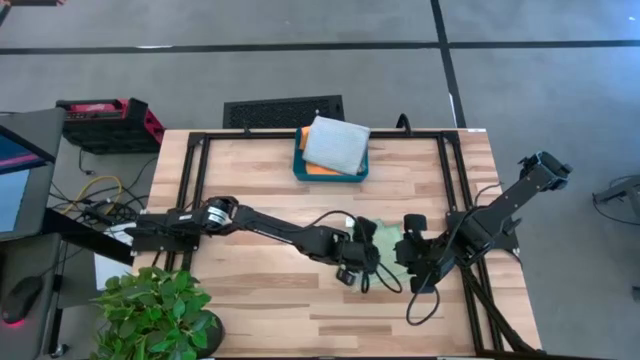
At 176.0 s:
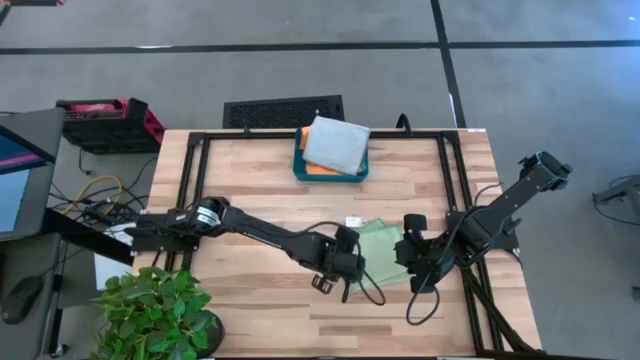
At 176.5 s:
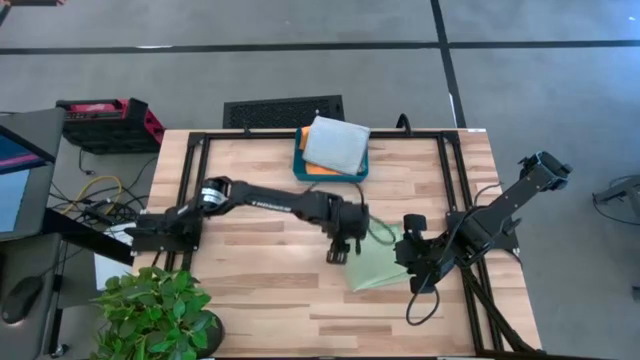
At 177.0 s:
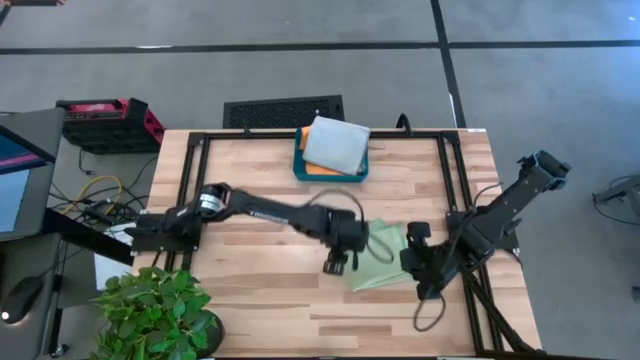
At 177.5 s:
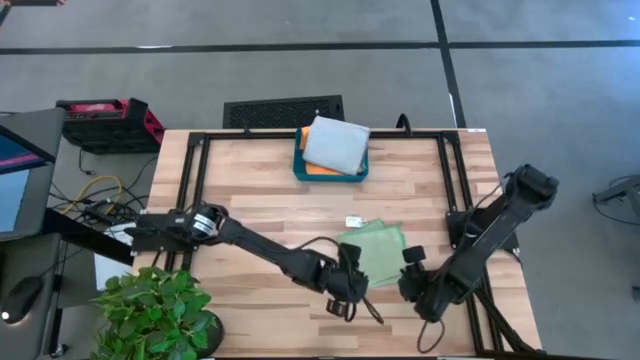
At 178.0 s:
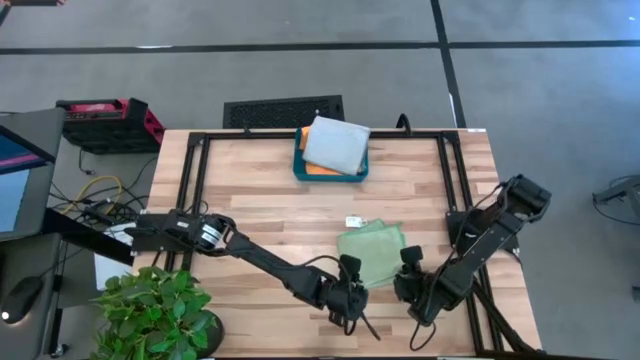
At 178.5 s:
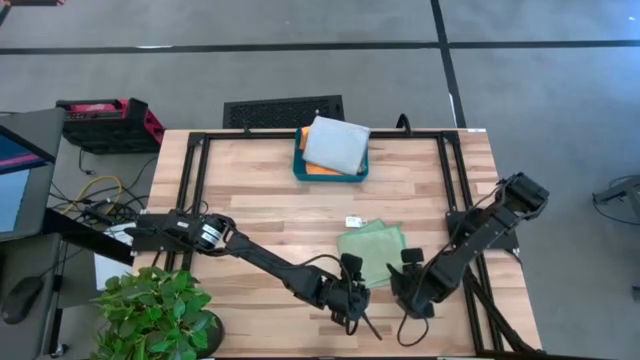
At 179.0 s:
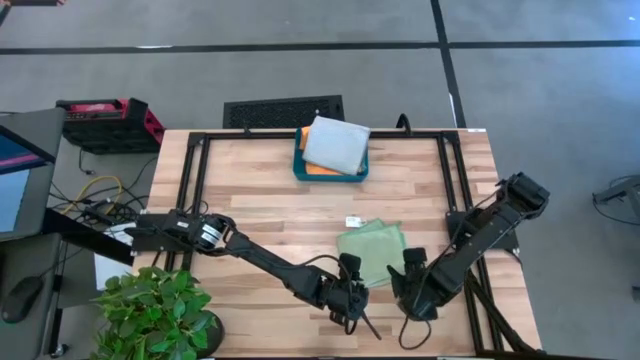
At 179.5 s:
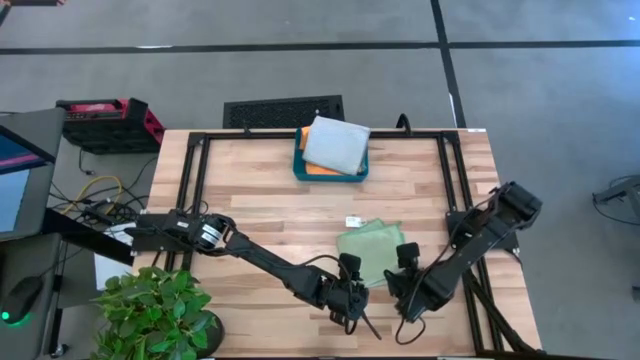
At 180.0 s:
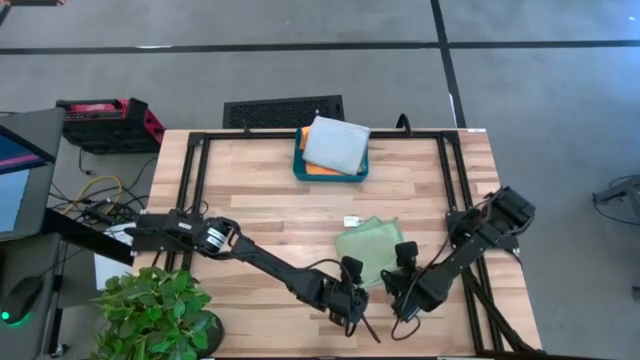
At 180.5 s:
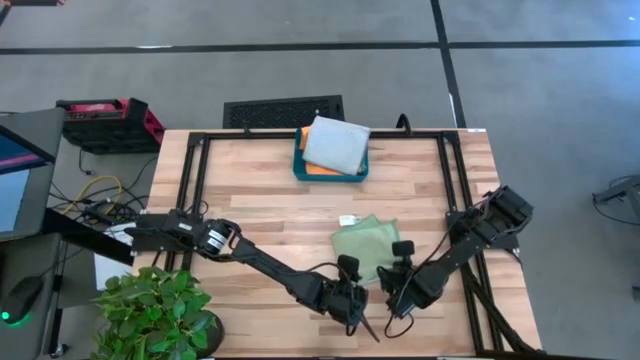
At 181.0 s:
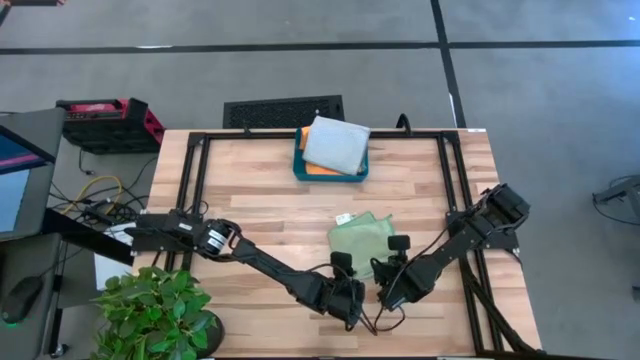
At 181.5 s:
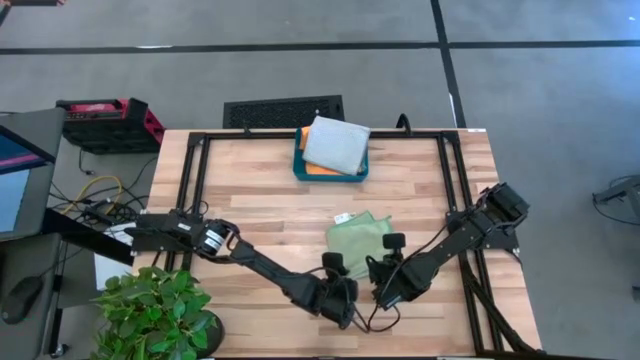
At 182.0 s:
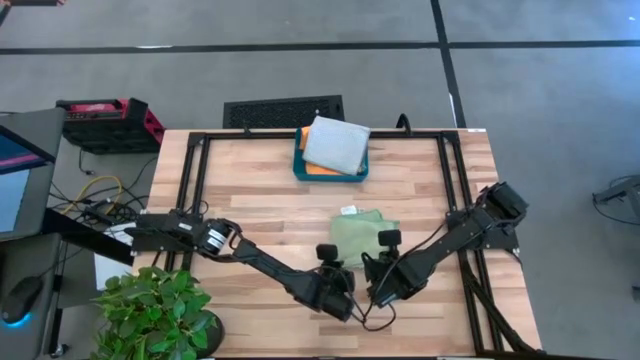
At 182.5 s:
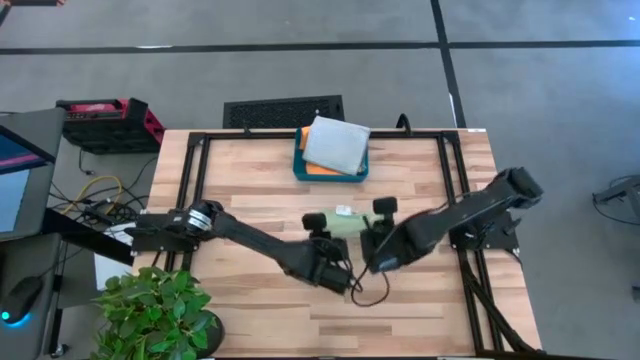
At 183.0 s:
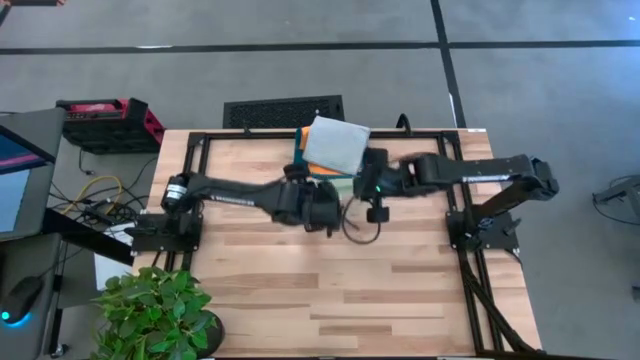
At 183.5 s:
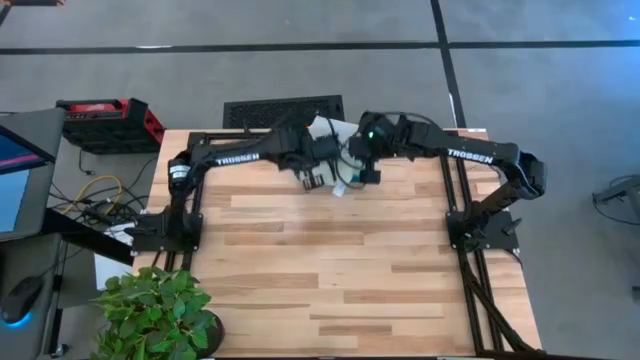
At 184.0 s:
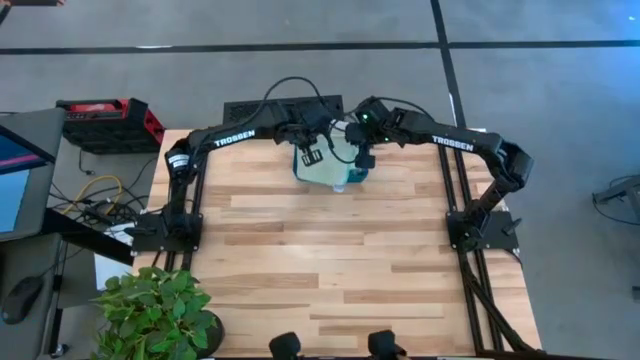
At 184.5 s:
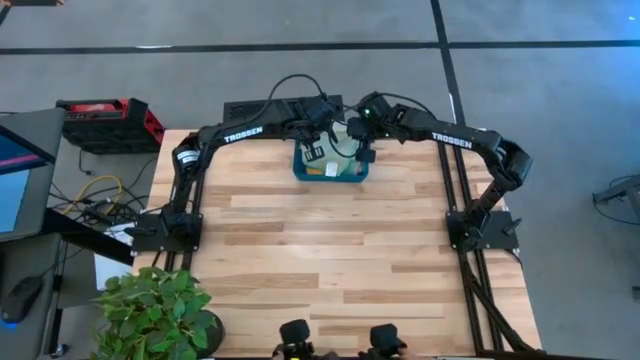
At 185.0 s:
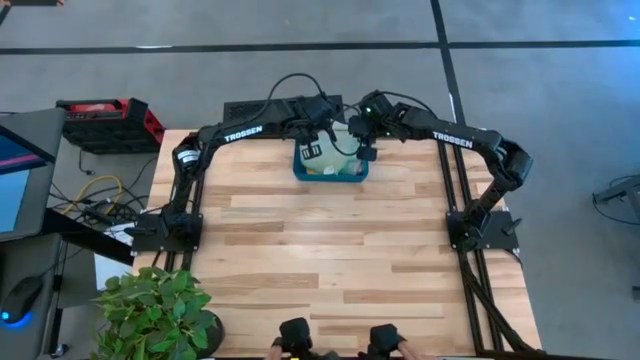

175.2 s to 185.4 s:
Task: Fold microfiber towels
Put the folded green towel into the blue bin

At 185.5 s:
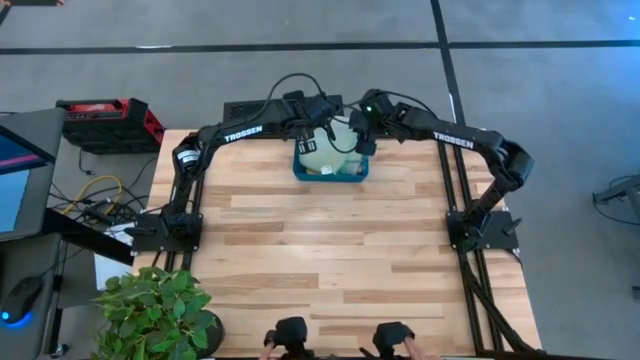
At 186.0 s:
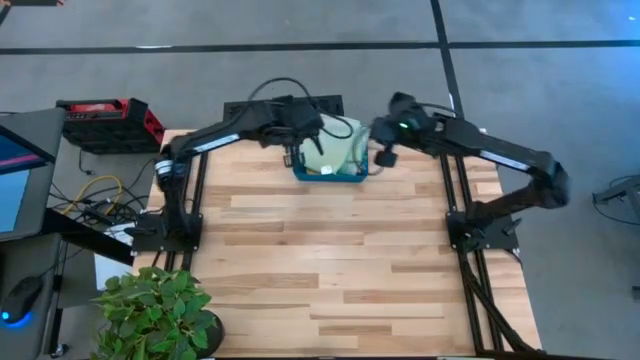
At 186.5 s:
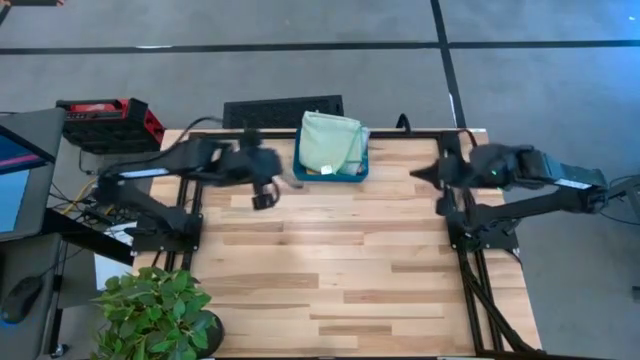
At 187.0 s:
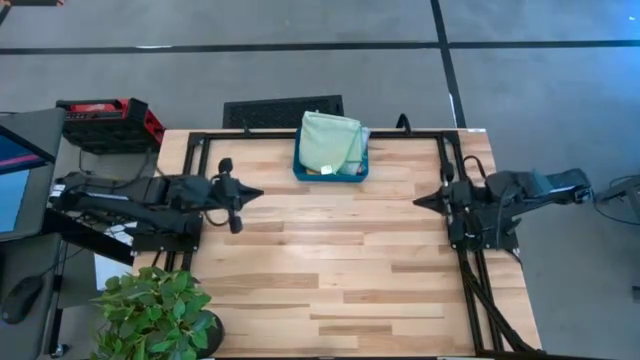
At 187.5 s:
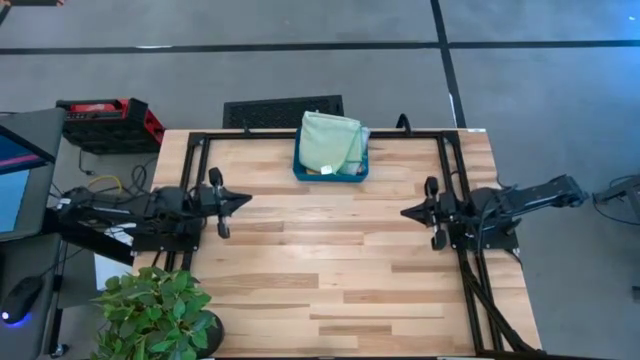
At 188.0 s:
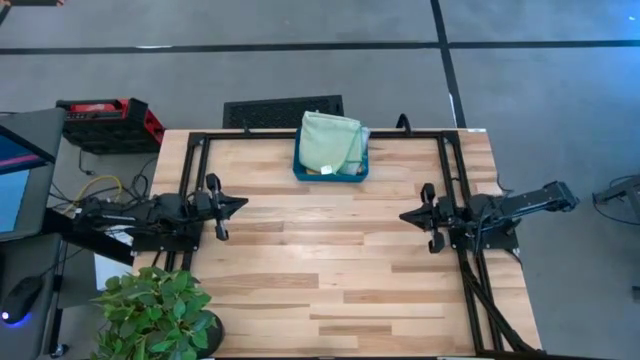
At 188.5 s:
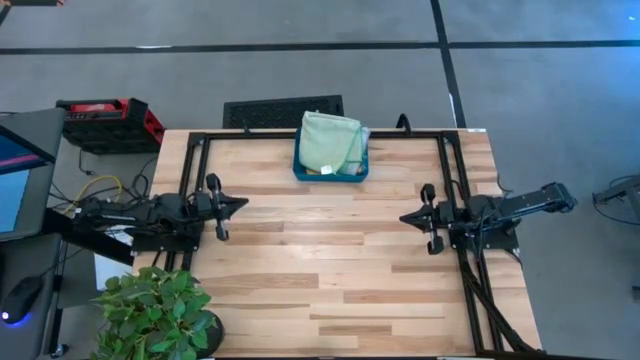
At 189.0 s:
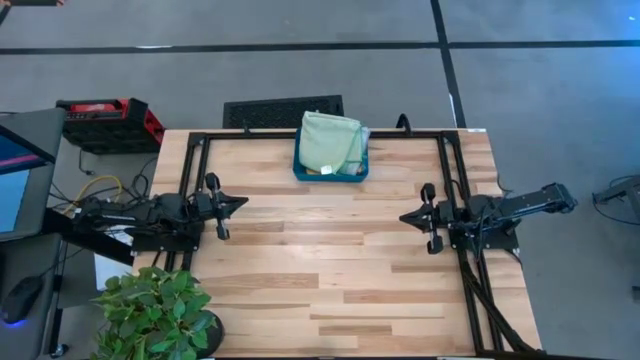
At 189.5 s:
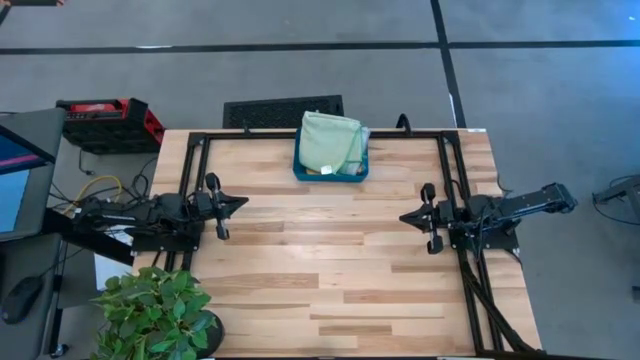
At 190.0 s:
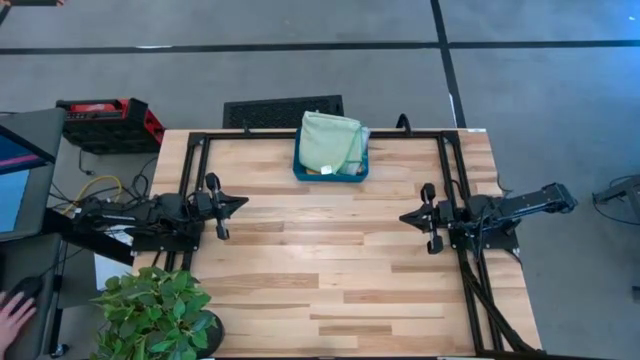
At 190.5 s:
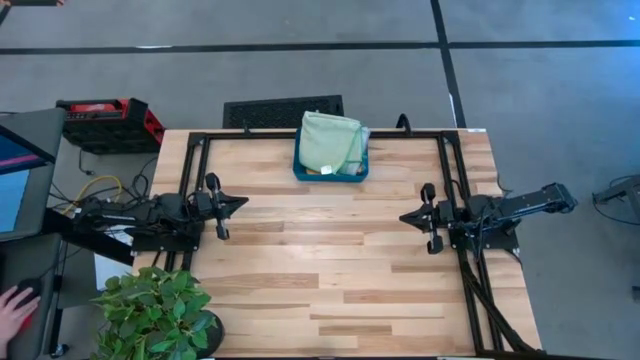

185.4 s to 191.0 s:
Return to Home Position

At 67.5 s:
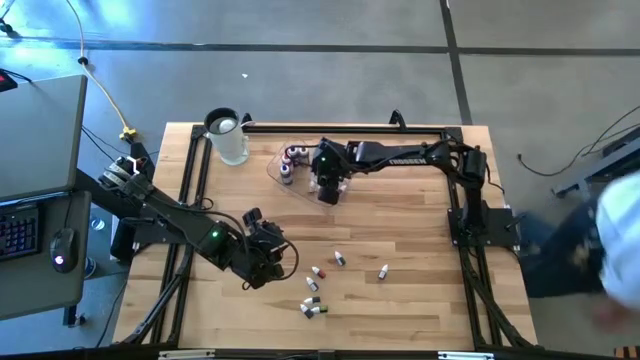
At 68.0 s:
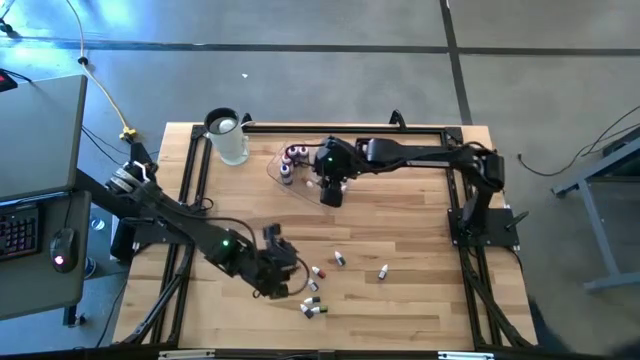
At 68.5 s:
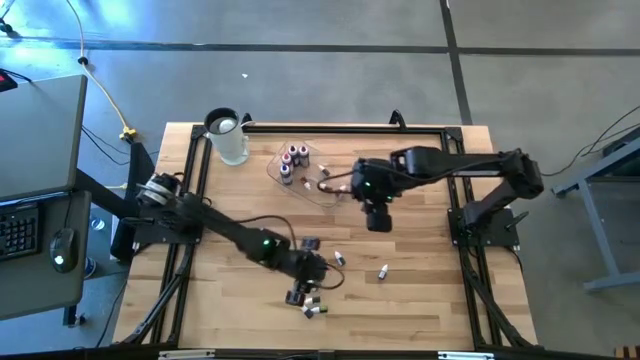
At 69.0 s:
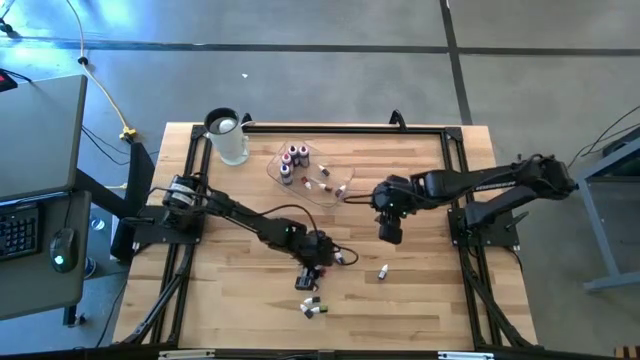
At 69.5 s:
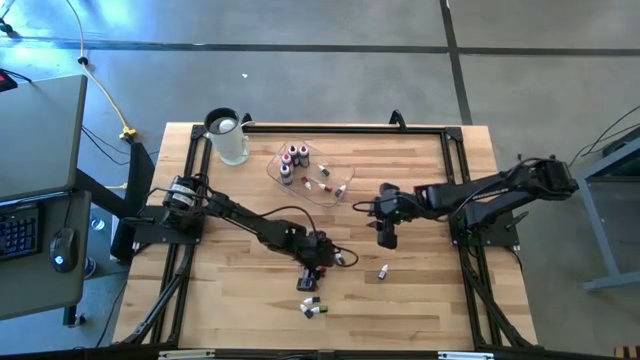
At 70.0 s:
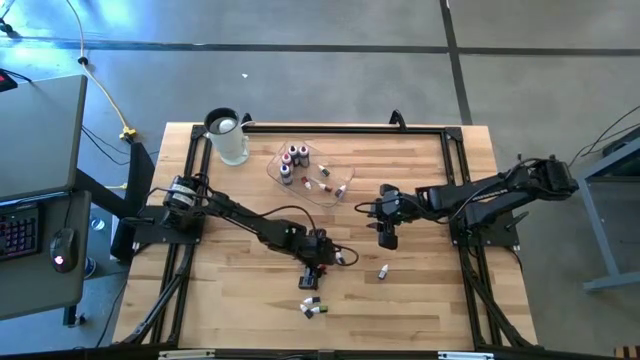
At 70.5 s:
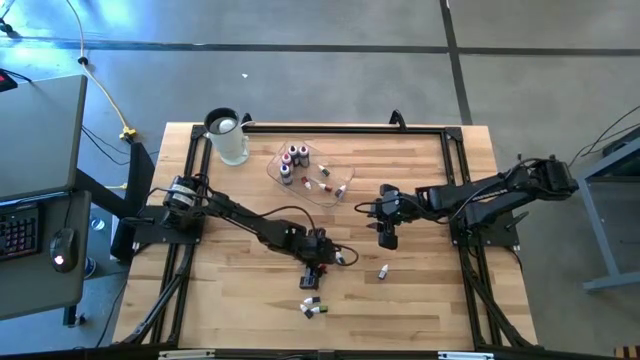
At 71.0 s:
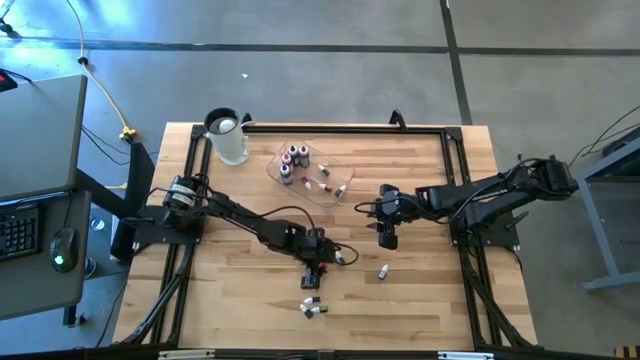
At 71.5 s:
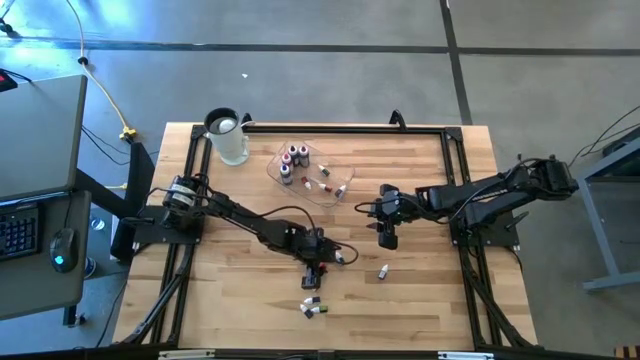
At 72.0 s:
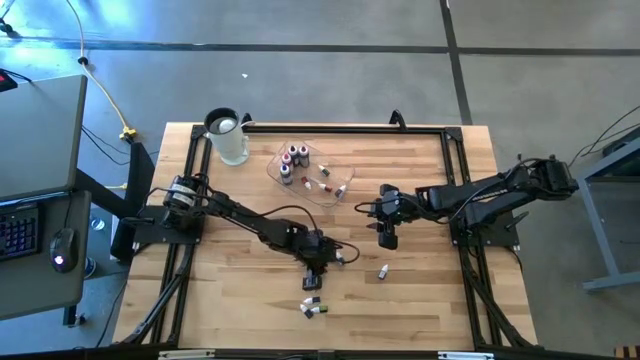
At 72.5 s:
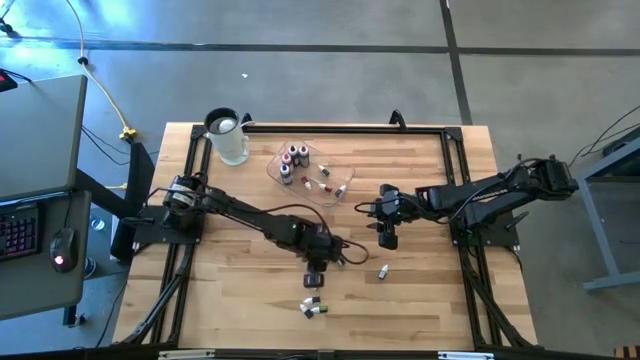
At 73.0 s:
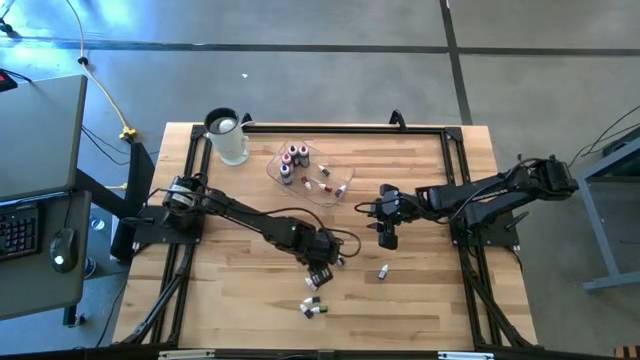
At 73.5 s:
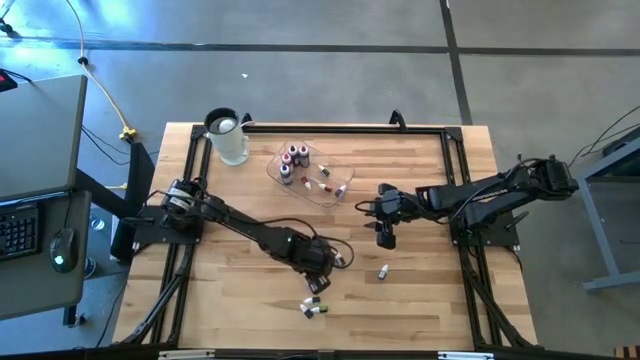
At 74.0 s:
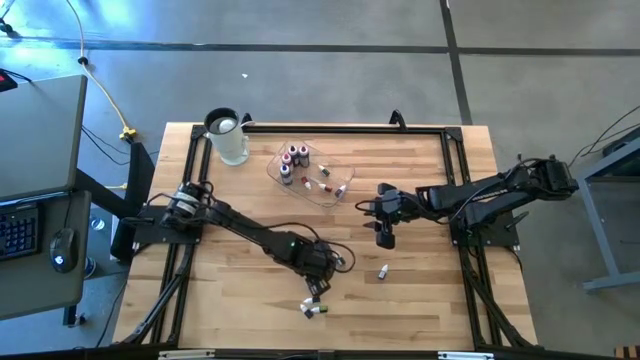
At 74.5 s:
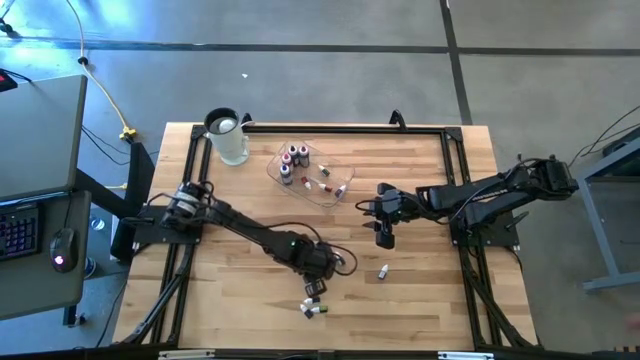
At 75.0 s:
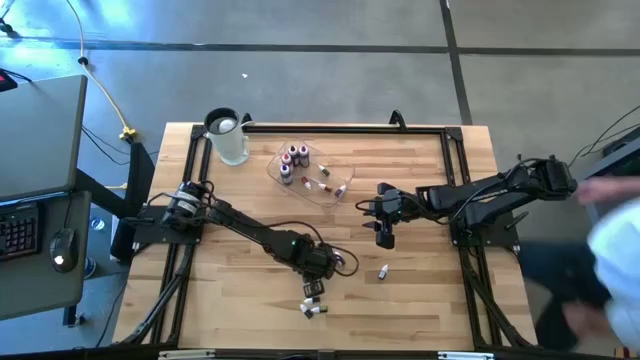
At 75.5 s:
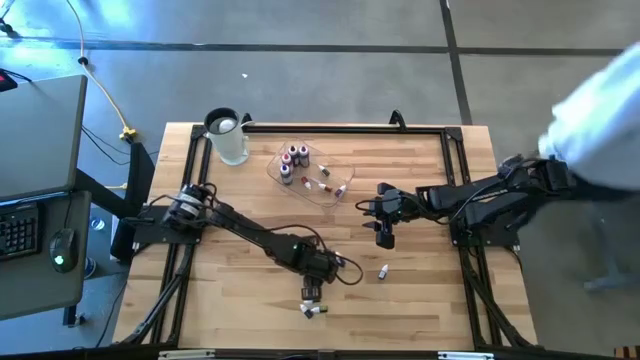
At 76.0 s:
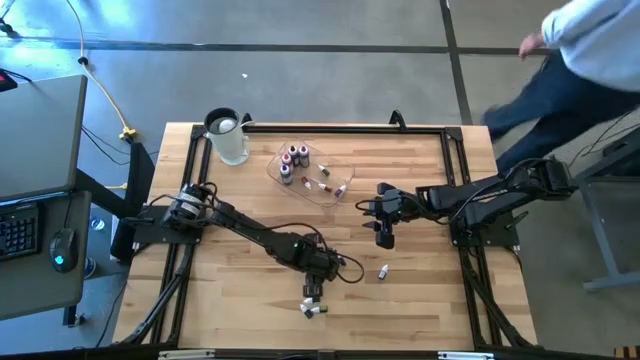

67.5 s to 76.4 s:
Task: Pick & Place food coloring
Put the small red food coloring bottle into the bin
